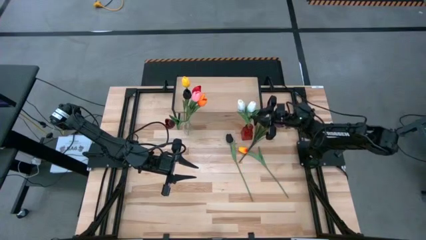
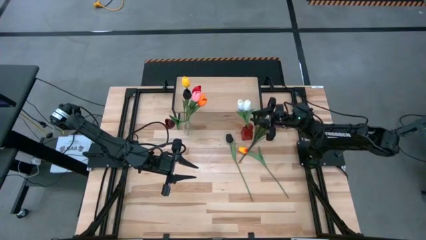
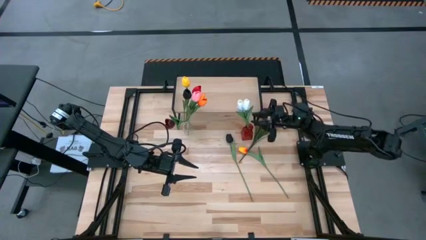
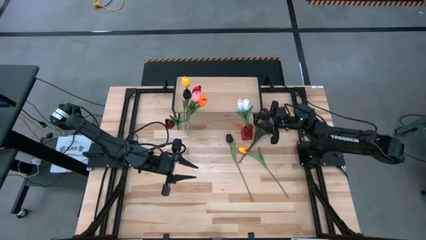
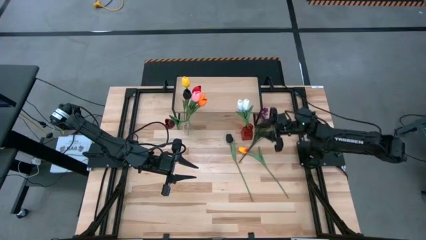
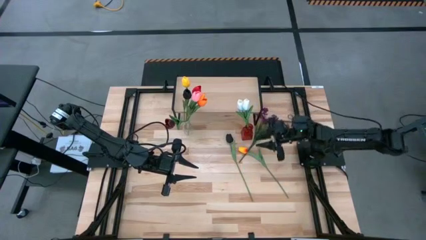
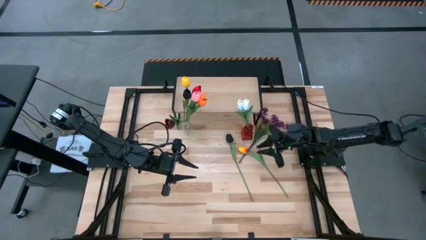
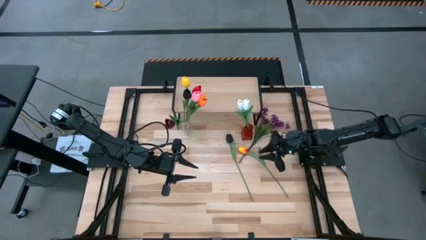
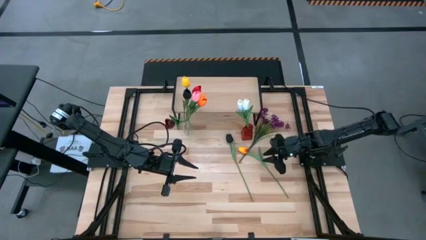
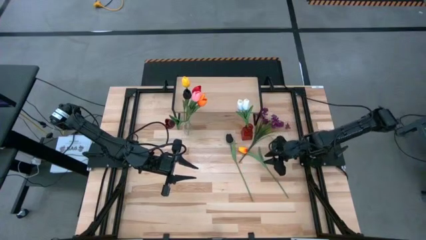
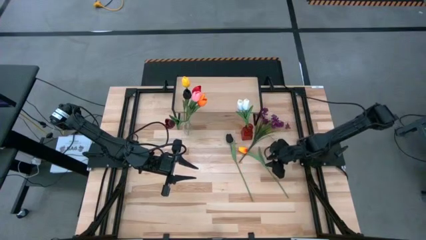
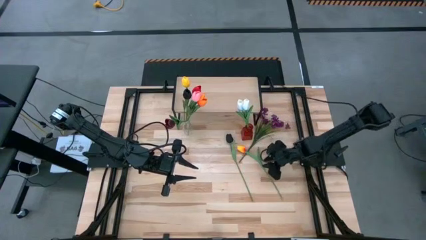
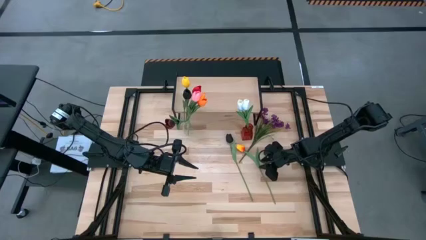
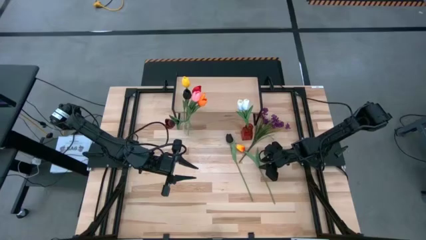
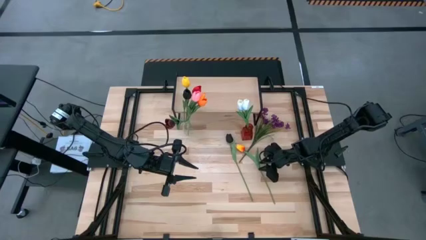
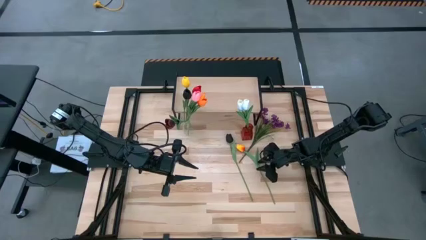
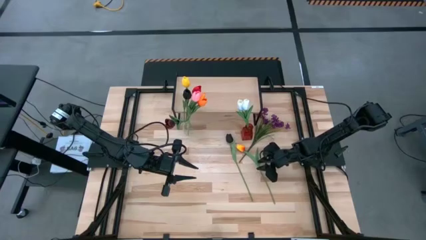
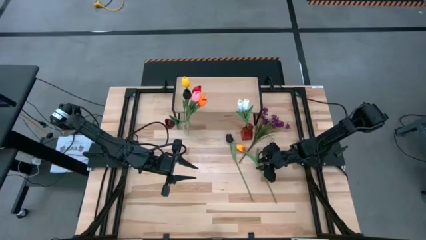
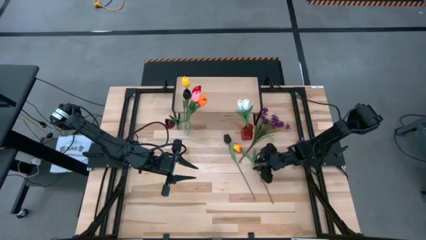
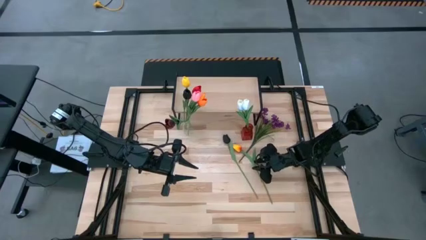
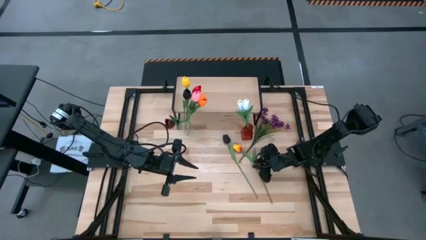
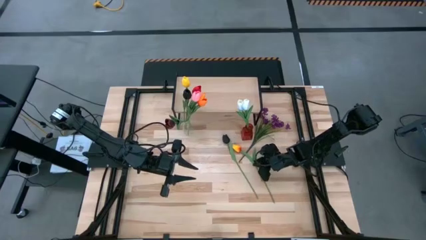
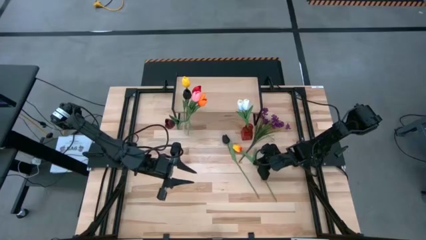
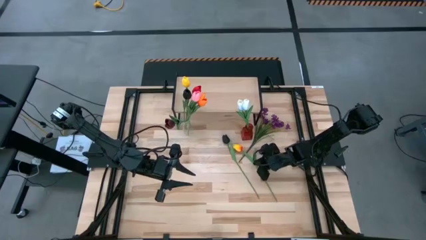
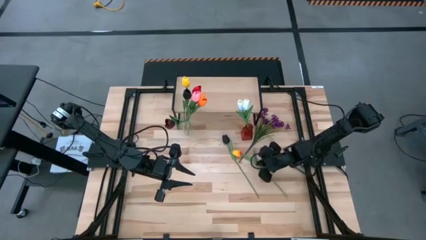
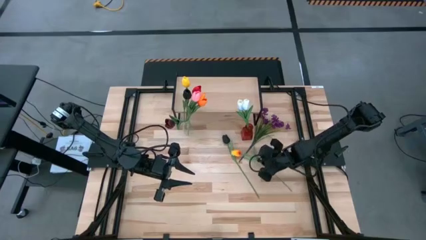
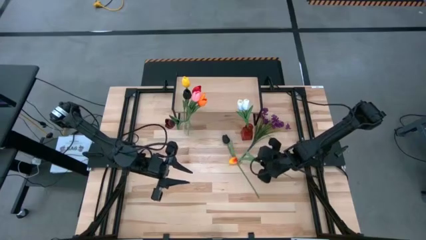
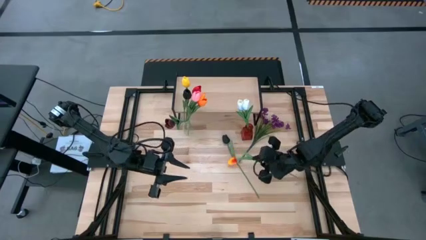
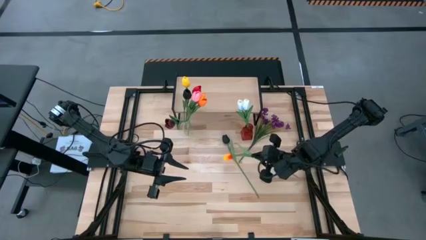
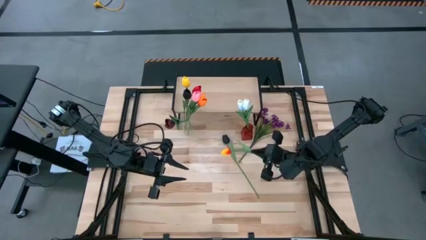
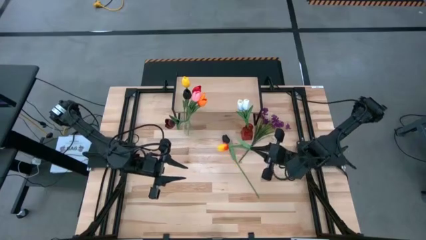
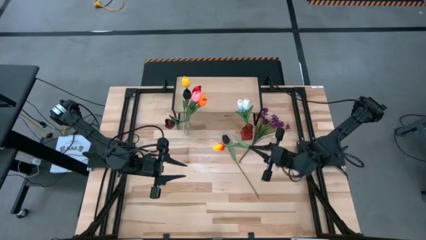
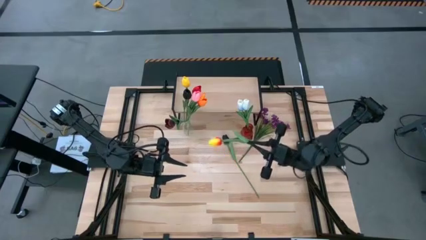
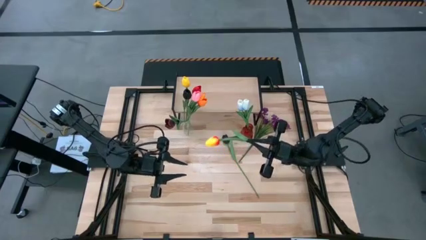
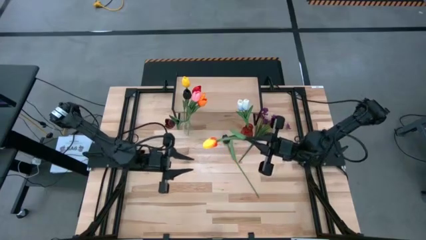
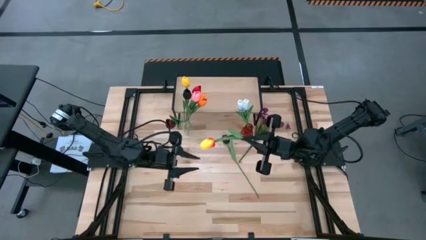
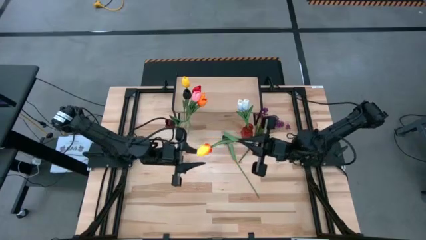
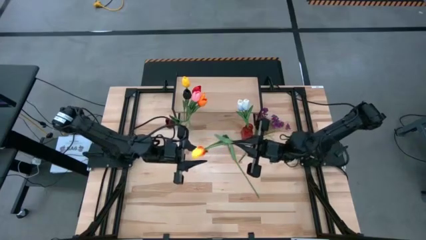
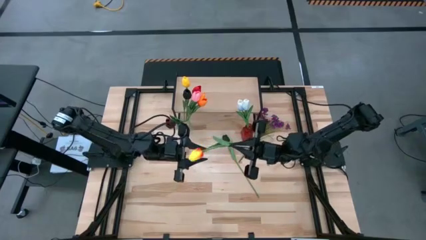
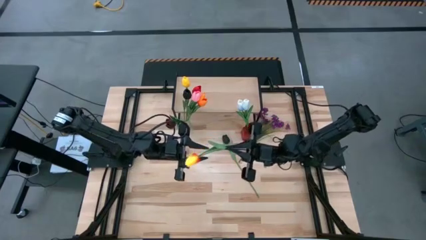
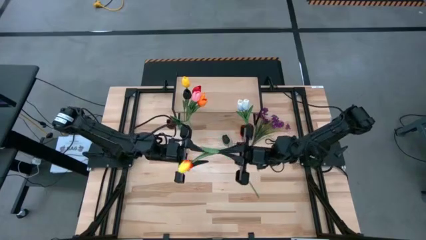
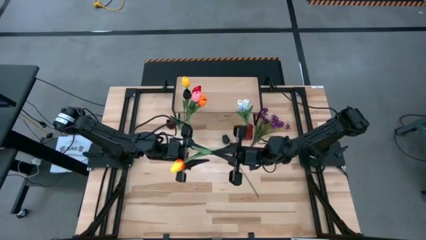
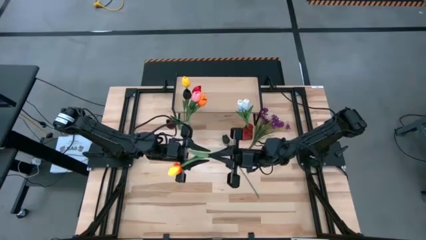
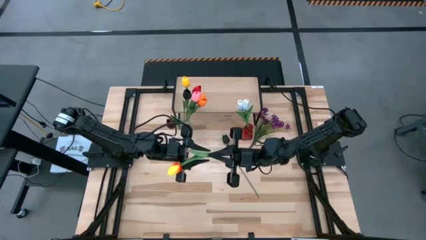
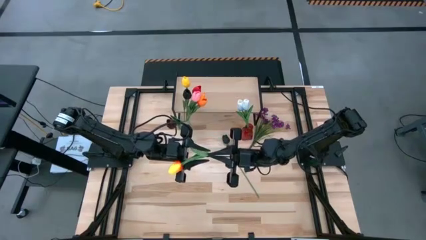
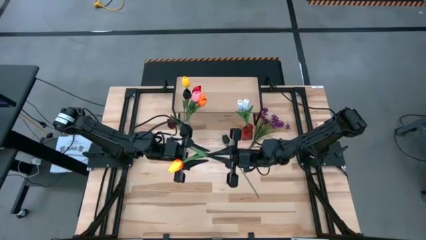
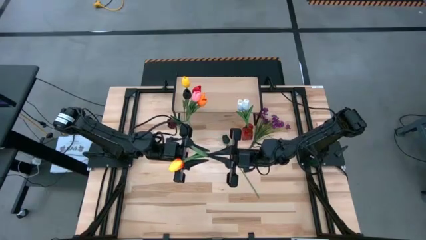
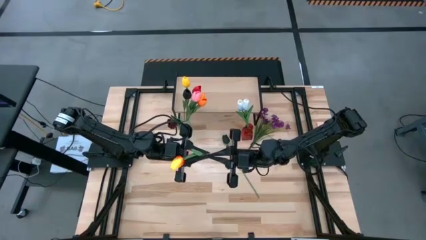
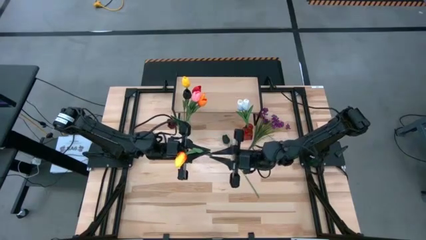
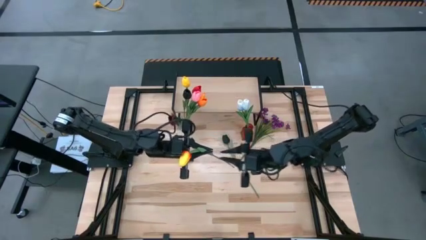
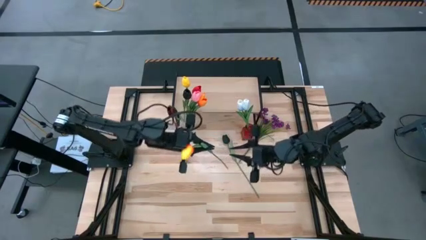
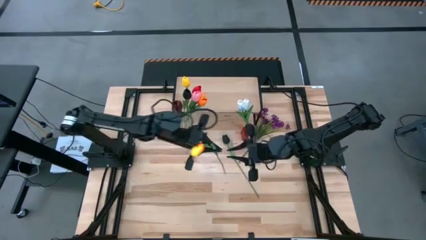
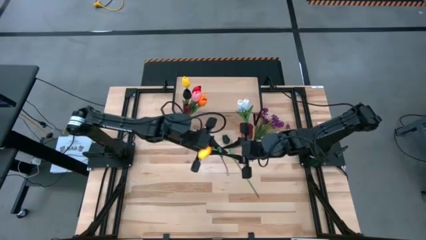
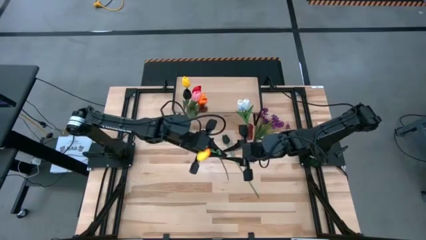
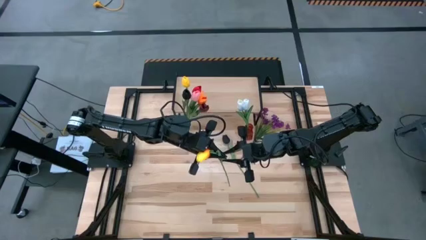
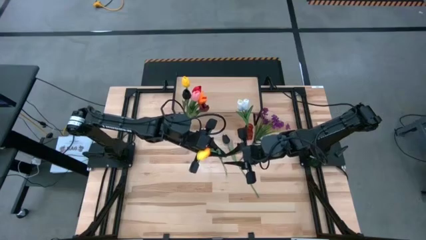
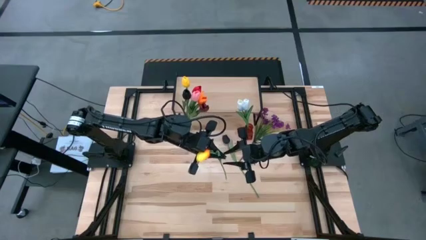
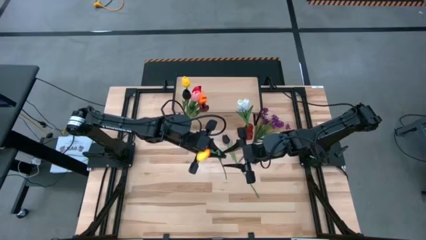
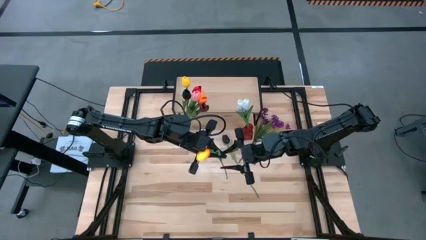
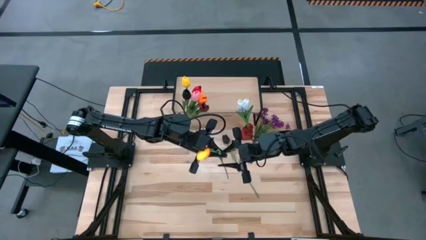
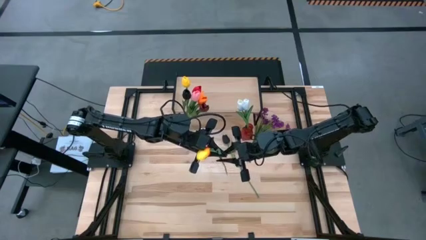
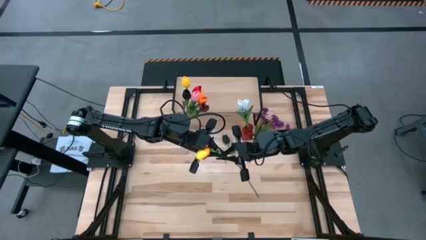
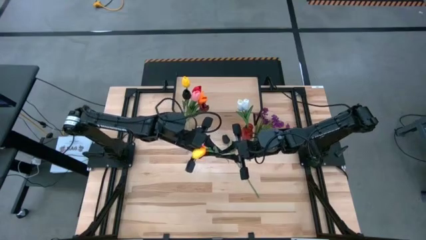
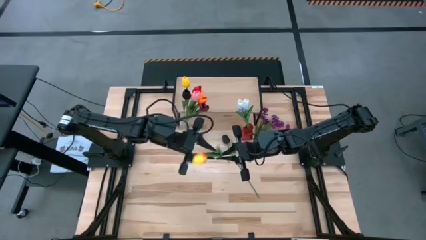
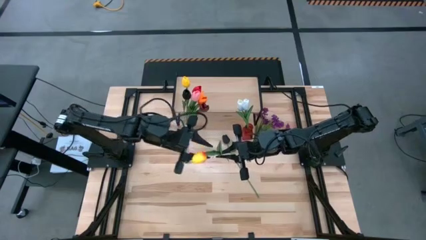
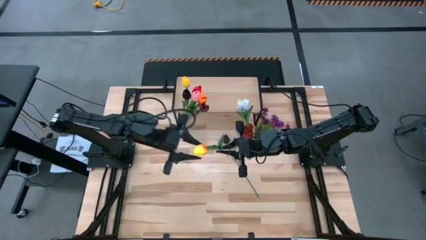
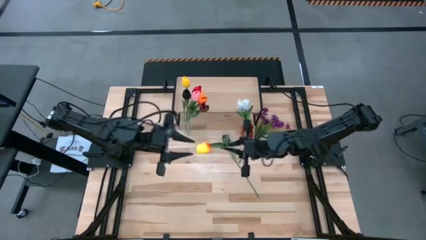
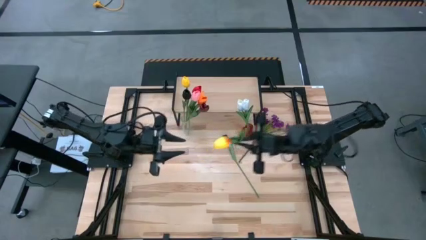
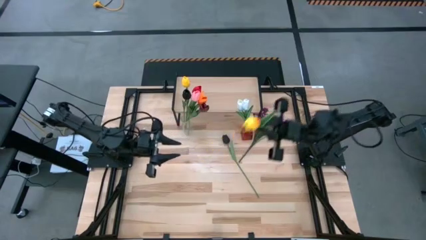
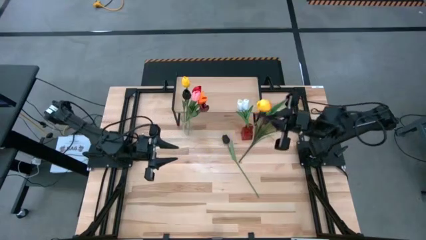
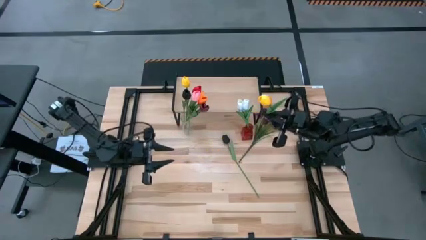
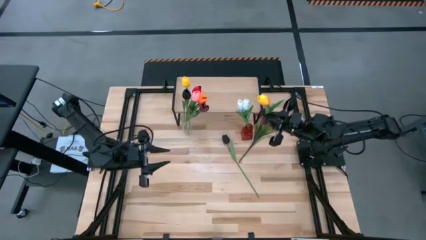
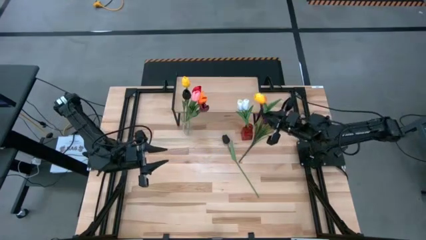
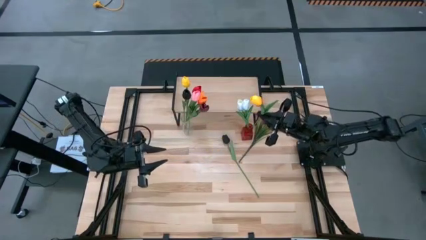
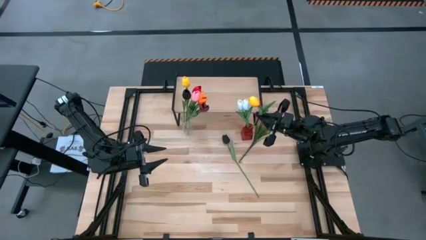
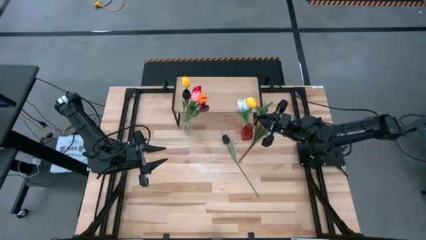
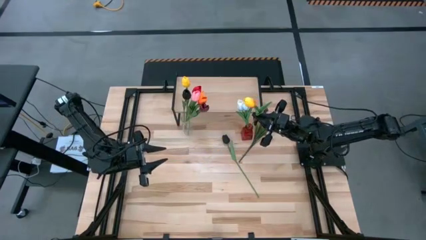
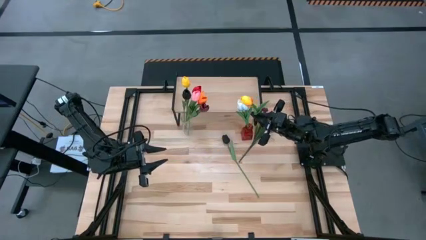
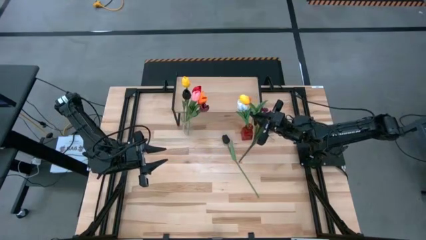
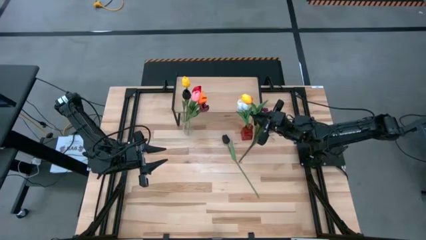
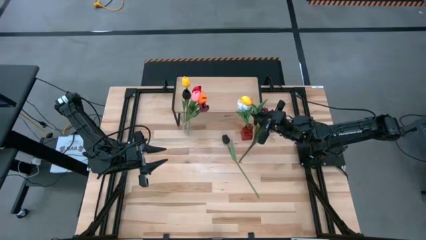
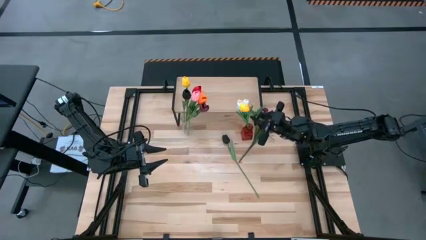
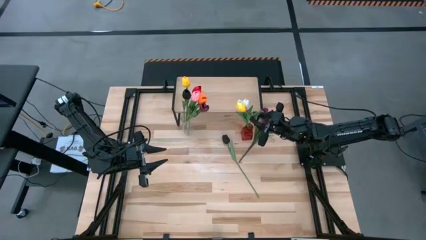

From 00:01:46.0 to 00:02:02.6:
Task: Pick and place flowers into a vace then onto a shelf
Put the yellow flower into the red vase

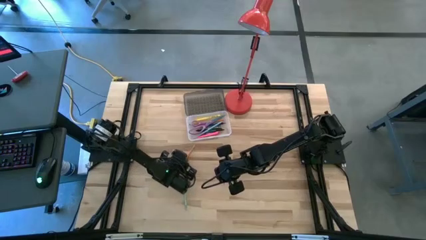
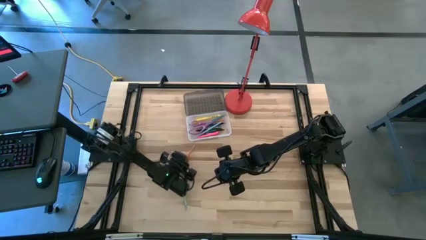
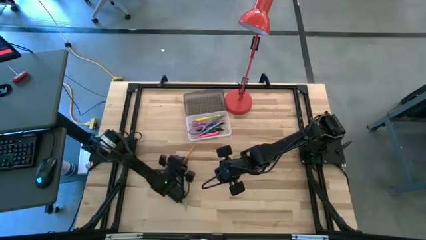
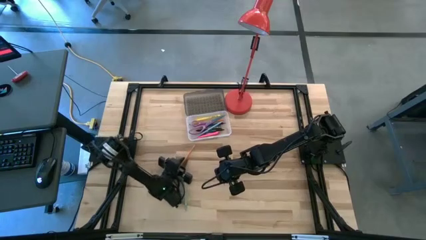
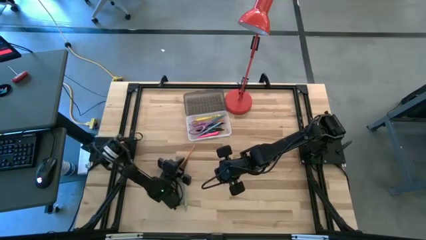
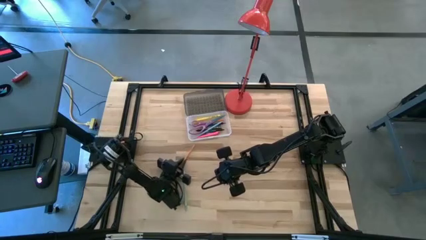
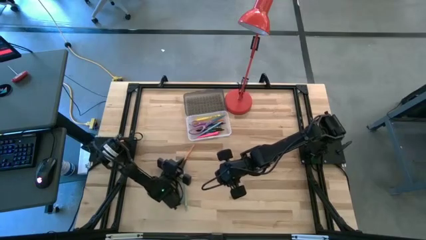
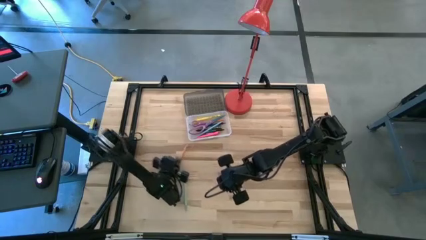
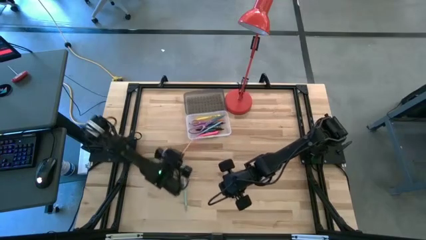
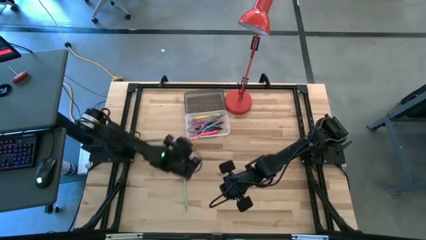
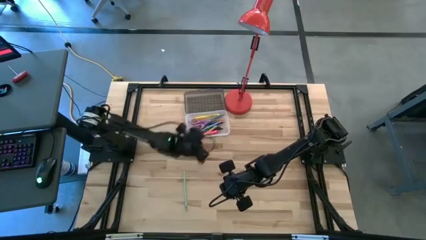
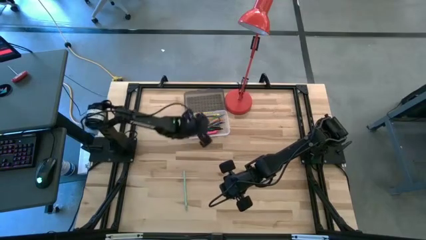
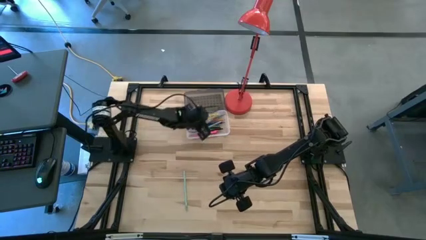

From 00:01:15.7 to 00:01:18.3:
Task: Pick & place school supplies into a supply box
Put the orange pencil into the black supply box
